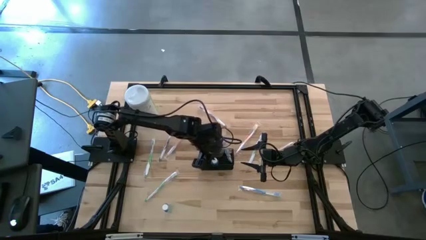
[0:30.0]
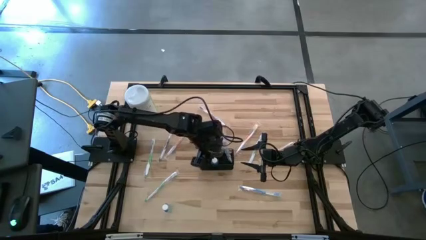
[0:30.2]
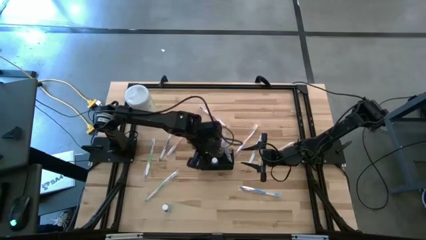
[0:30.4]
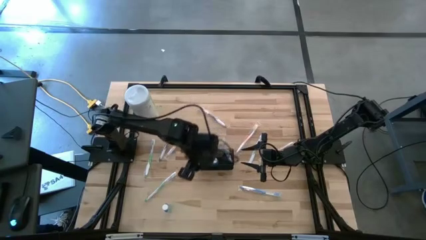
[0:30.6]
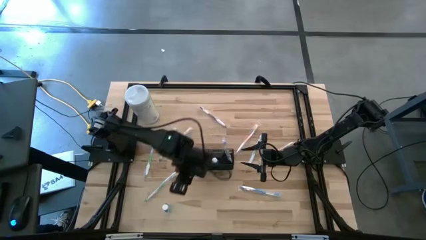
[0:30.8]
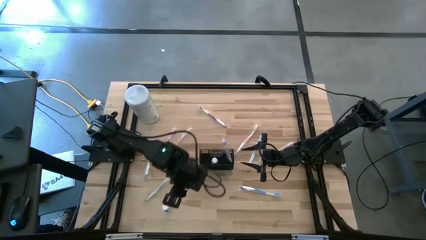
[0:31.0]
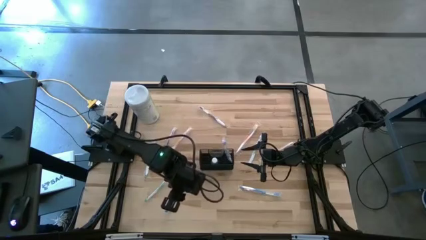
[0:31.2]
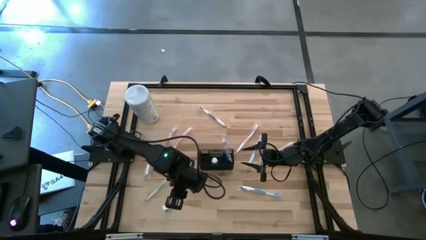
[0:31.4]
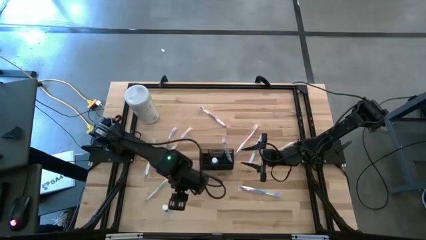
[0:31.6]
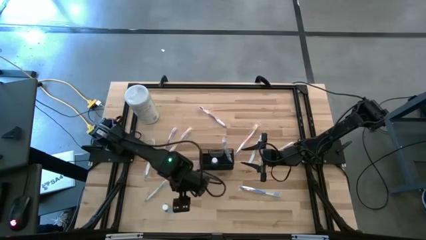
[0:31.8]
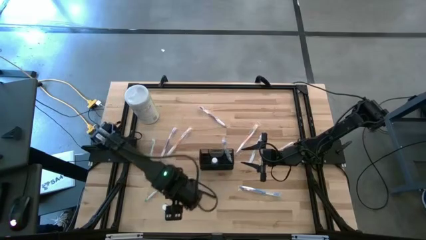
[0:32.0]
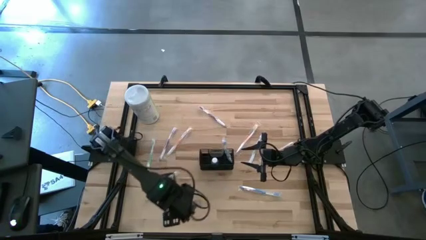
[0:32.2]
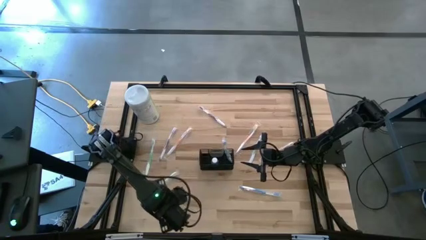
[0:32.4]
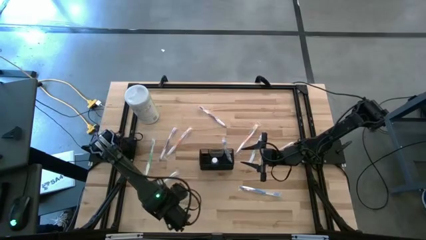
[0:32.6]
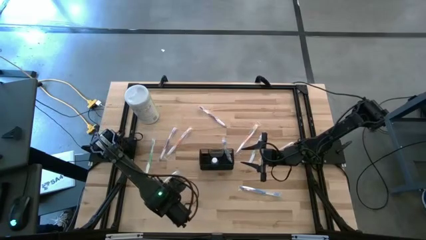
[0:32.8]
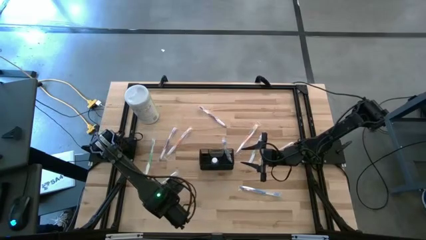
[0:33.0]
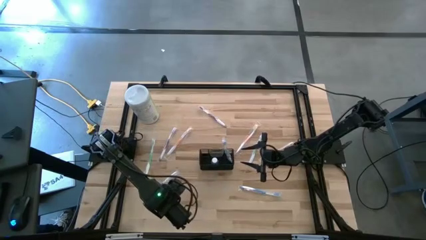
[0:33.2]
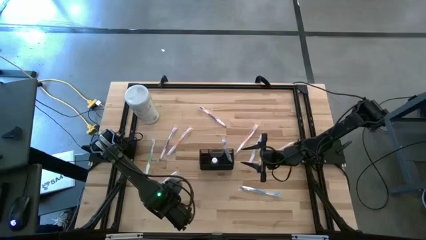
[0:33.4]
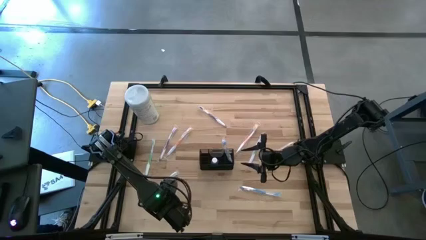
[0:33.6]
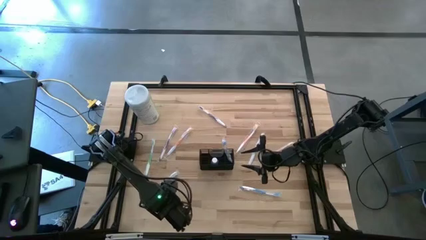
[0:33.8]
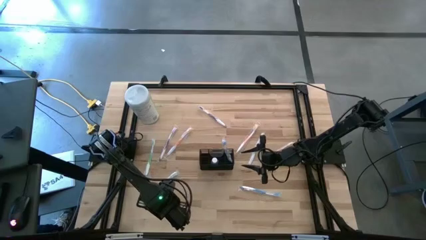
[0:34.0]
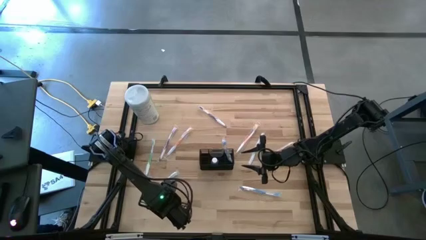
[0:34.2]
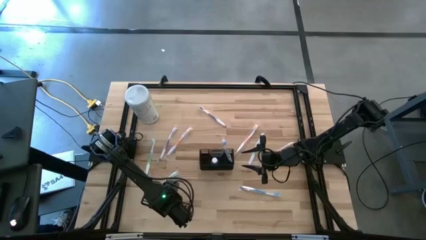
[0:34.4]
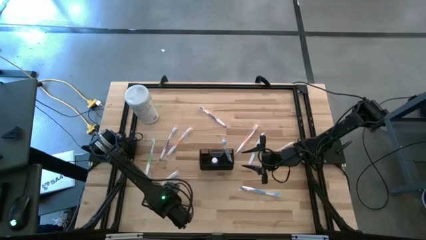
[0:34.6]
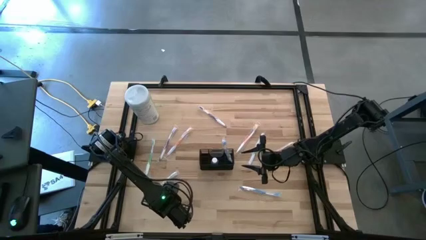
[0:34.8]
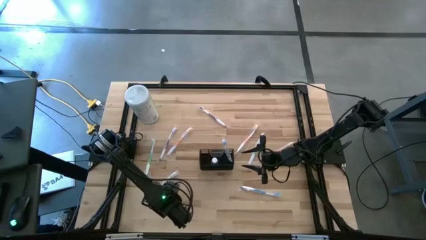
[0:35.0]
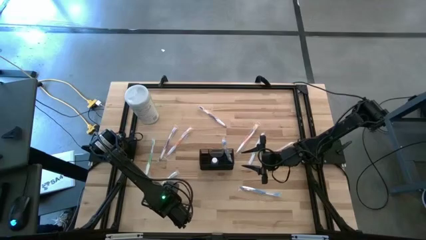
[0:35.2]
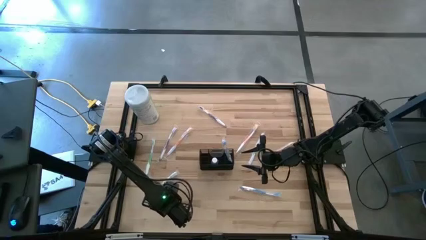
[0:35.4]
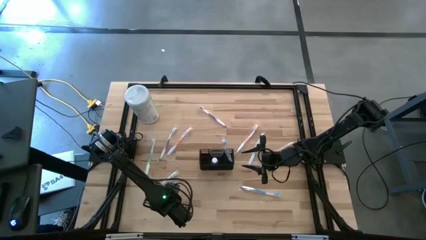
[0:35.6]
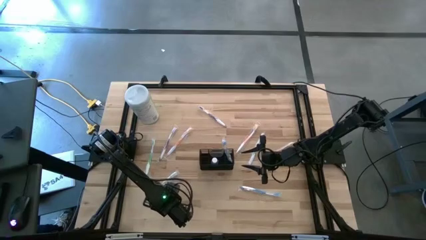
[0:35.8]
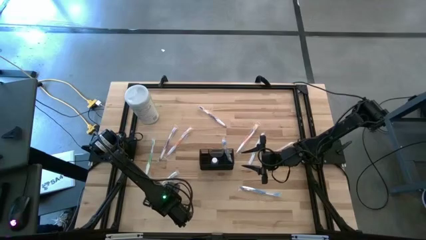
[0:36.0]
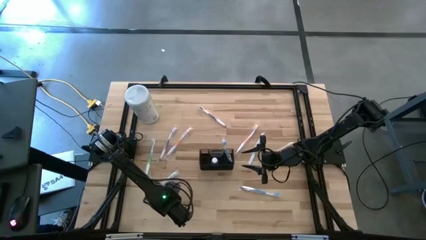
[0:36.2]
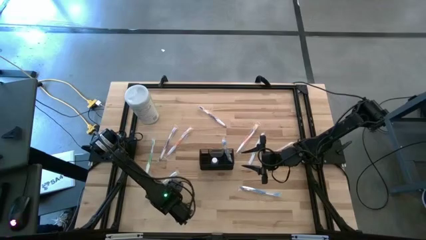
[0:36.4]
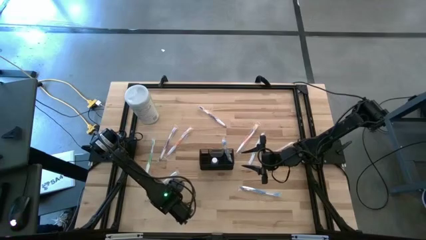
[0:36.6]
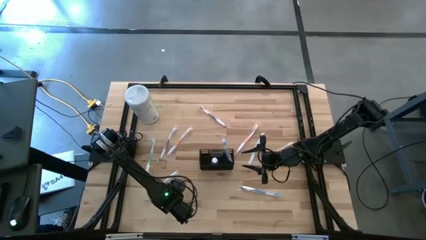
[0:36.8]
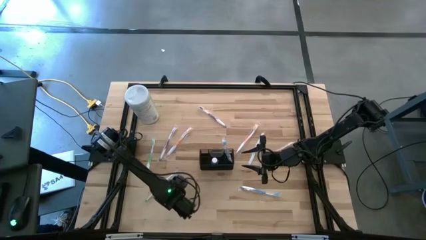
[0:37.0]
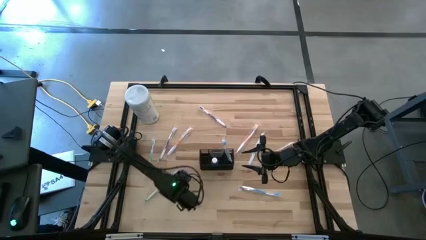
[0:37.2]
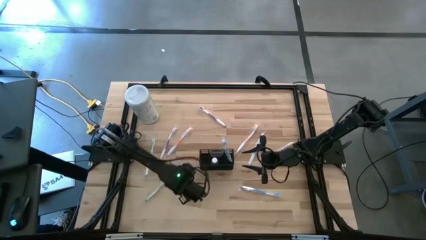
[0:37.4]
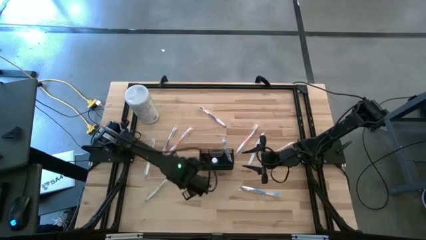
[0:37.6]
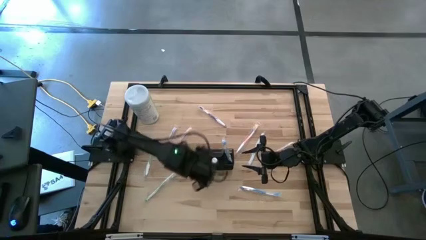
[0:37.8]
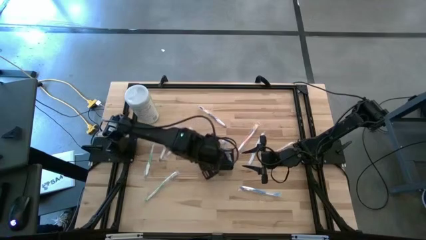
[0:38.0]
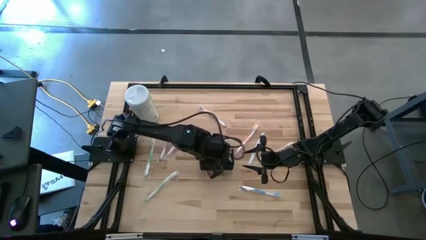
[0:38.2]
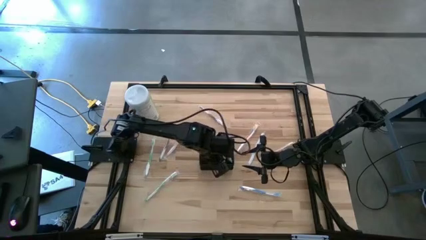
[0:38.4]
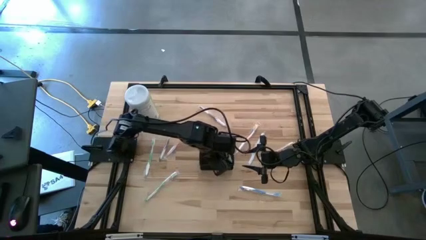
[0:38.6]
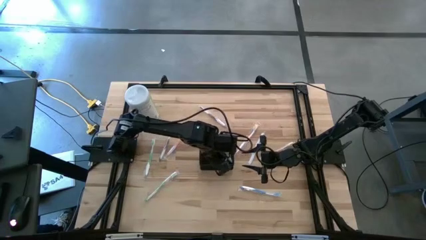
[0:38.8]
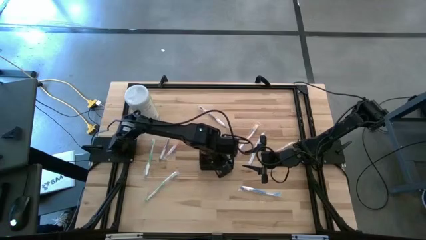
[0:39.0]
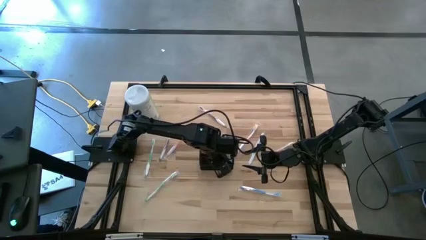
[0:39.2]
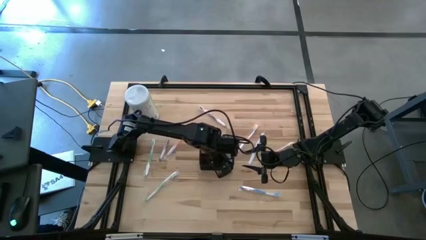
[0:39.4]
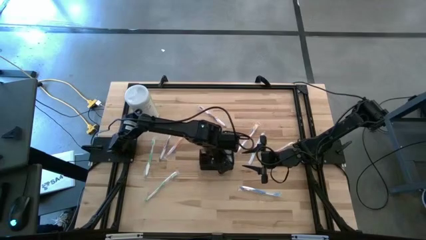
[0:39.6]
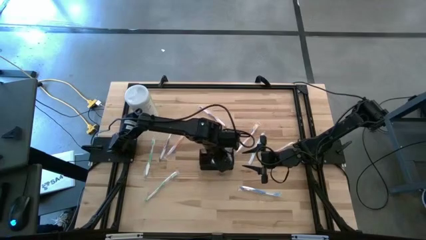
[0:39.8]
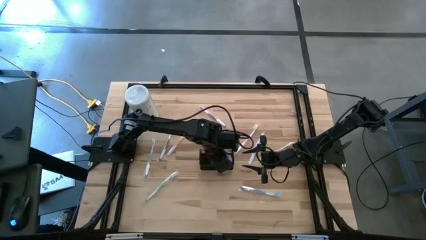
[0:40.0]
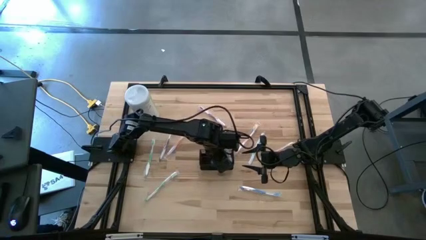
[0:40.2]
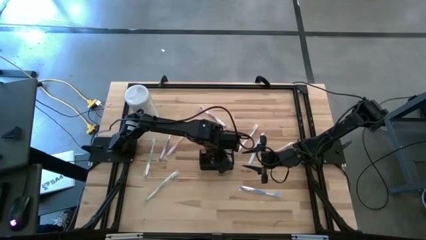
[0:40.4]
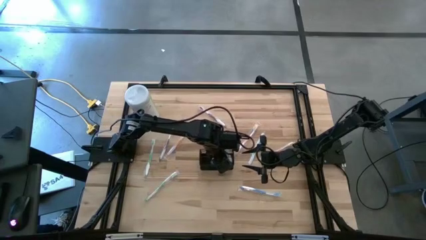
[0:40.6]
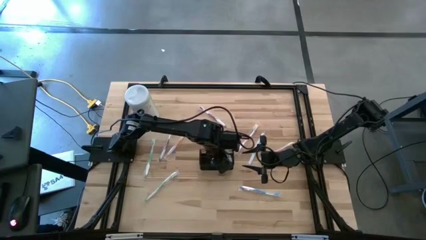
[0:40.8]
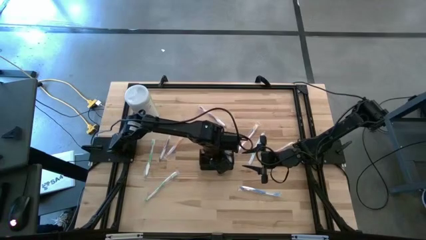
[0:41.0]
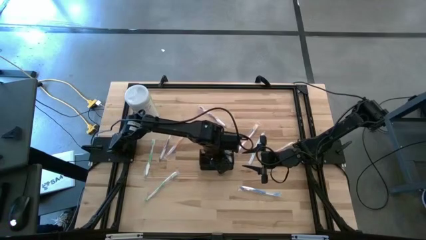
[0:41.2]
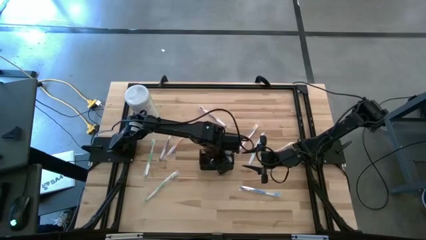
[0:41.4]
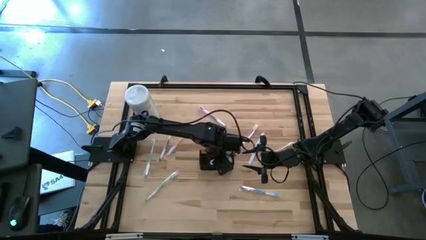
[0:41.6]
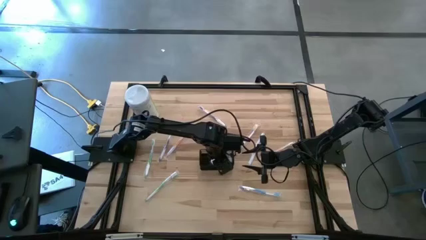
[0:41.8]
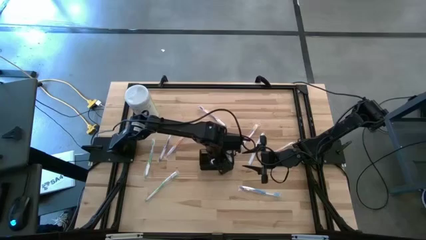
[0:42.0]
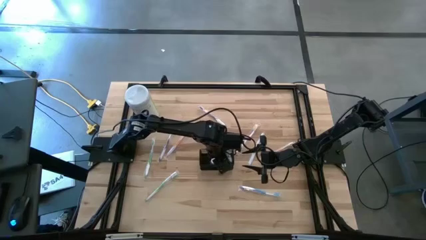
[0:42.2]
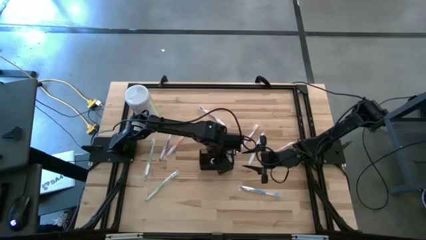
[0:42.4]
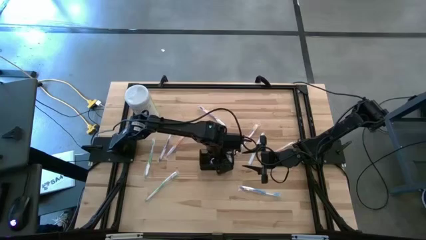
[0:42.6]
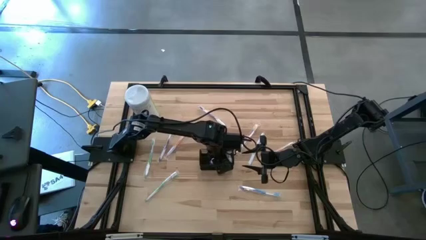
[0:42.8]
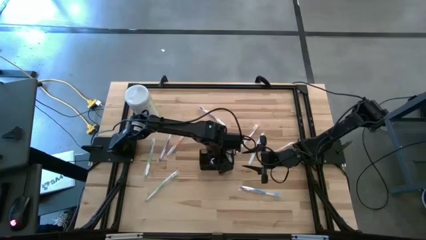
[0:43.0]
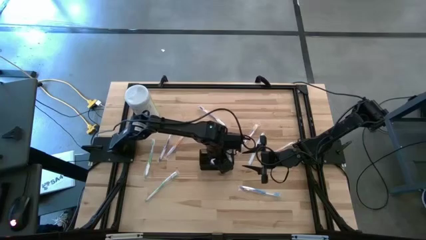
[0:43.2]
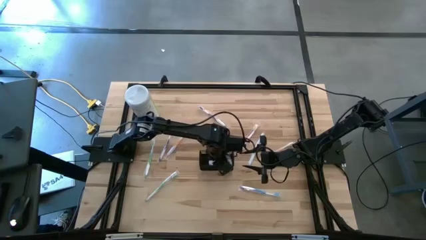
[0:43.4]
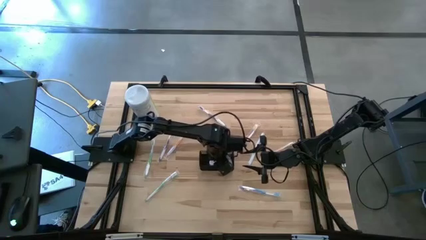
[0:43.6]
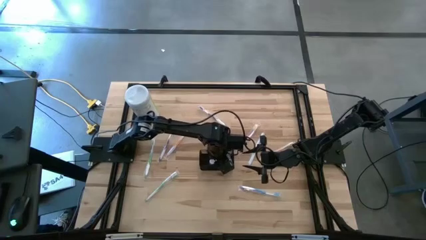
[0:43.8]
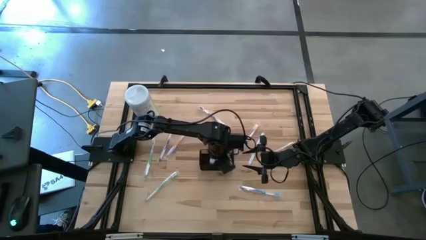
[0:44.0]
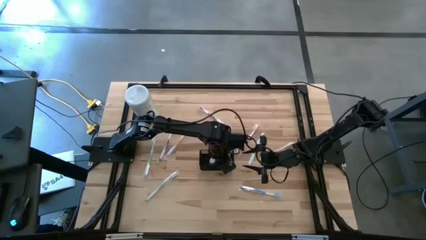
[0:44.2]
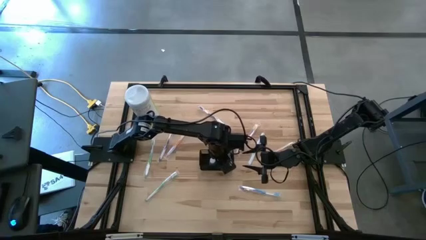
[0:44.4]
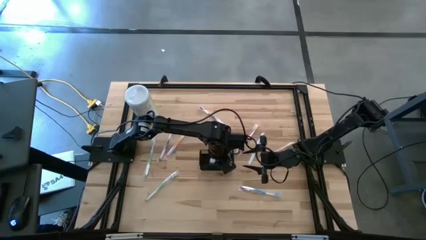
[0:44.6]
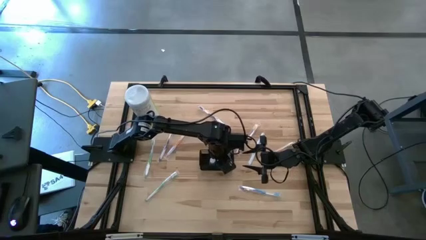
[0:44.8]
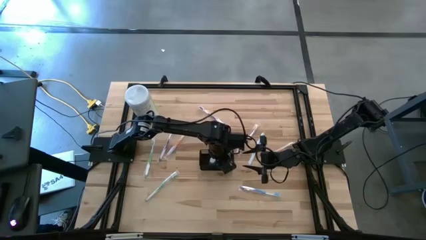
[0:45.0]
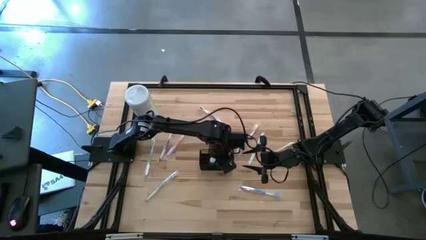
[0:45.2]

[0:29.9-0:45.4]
Task: Pick & Place toothbrushing station
Put the blue mouthwash into the black wire organizer

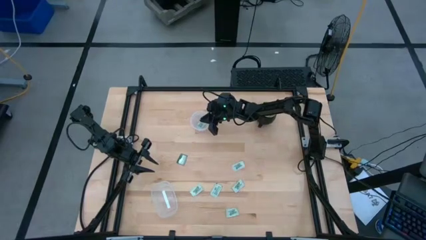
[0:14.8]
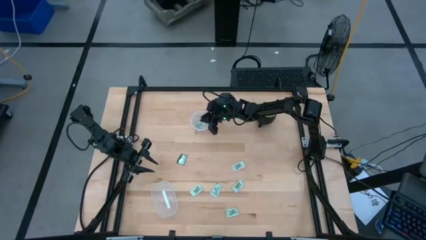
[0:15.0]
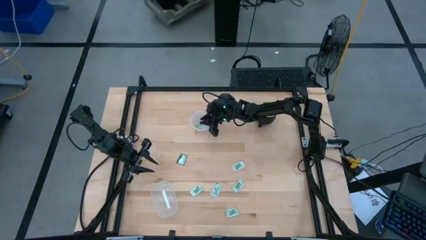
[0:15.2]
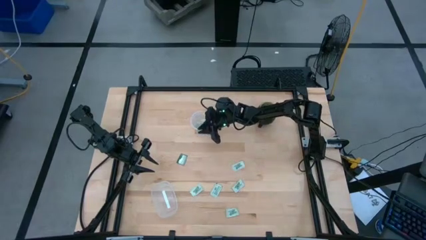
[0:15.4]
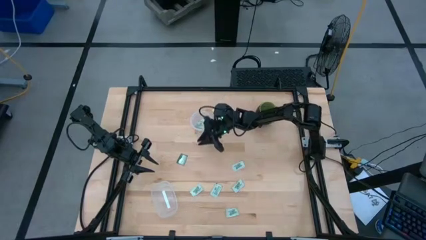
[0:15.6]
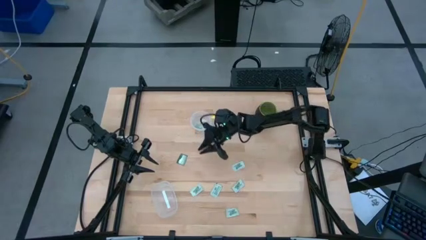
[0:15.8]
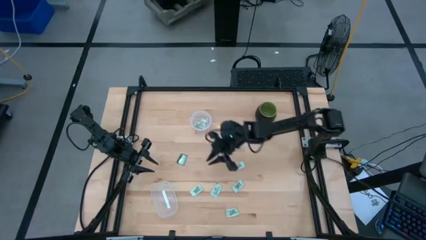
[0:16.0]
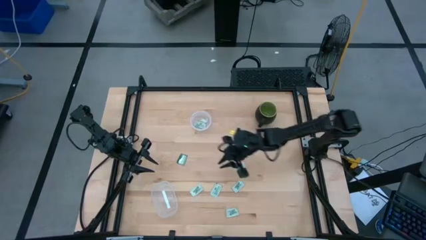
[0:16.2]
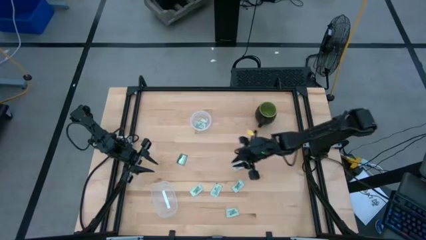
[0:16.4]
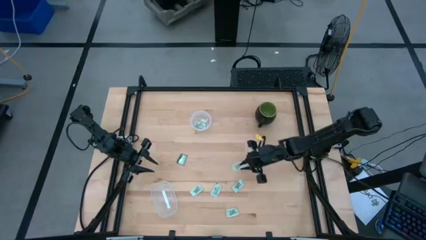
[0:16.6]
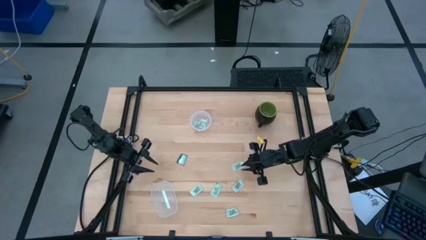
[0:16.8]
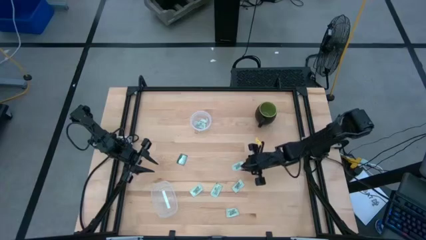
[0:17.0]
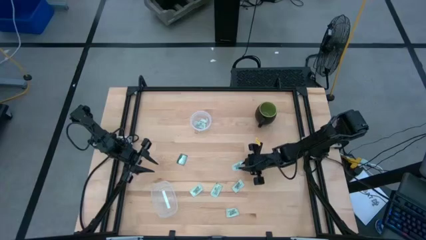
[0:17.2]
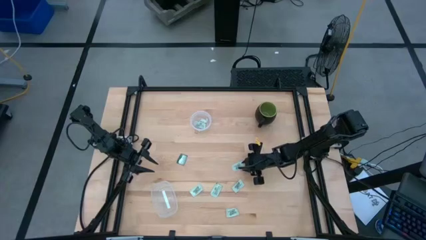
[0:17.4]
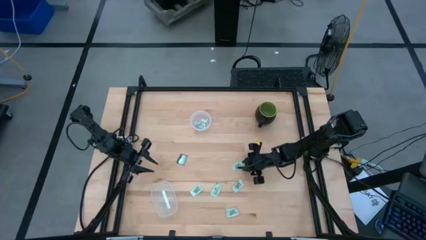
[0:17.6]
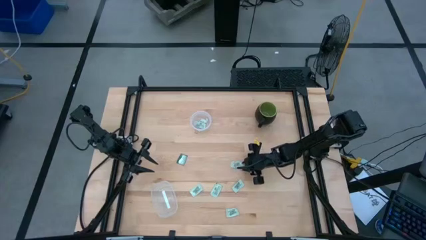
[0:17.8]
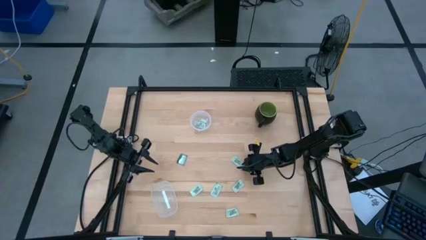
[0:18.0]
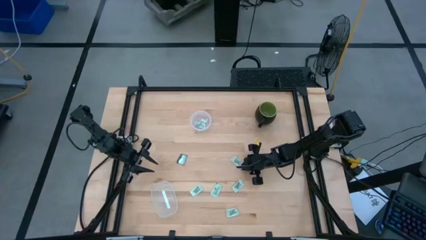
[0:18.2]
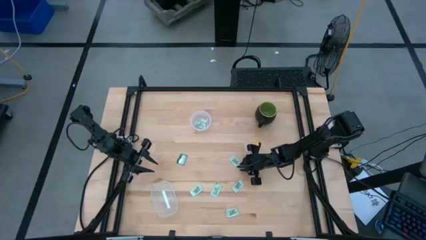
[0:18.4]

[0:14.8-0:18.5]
Task: Pick and place Stevia / Truvia into bins
Put the stevia packet into the transparent circle container
